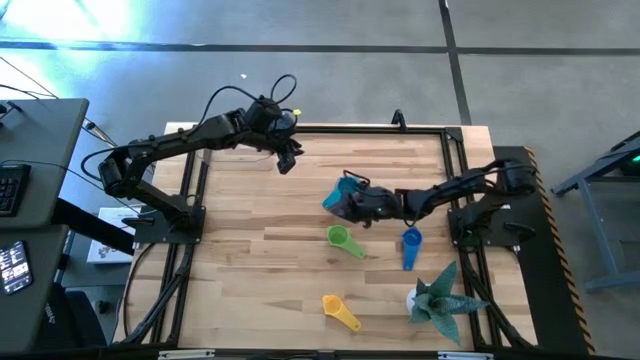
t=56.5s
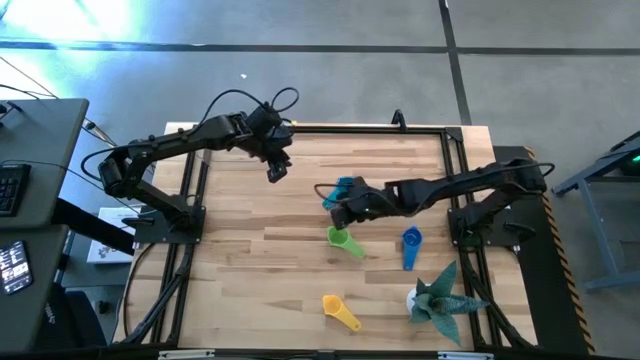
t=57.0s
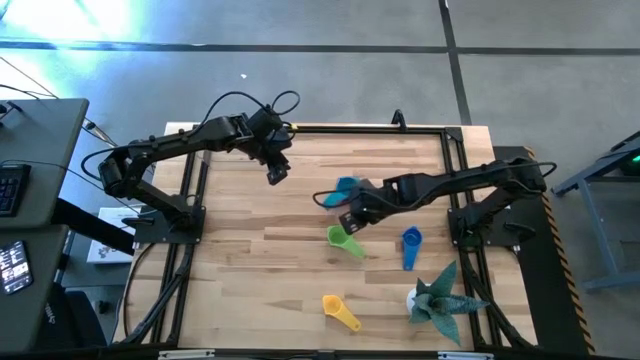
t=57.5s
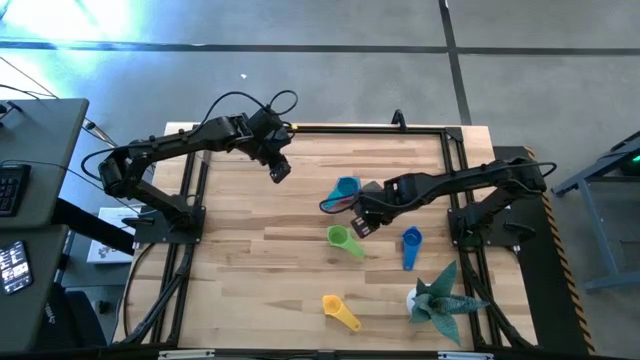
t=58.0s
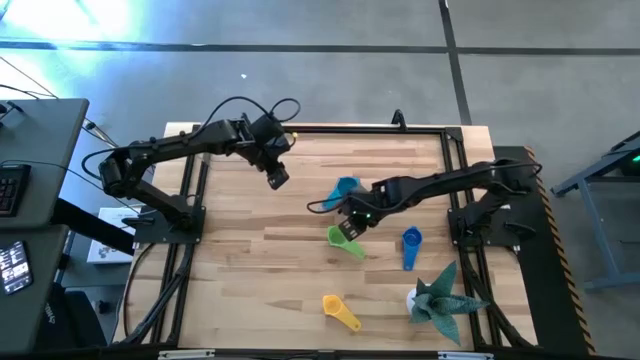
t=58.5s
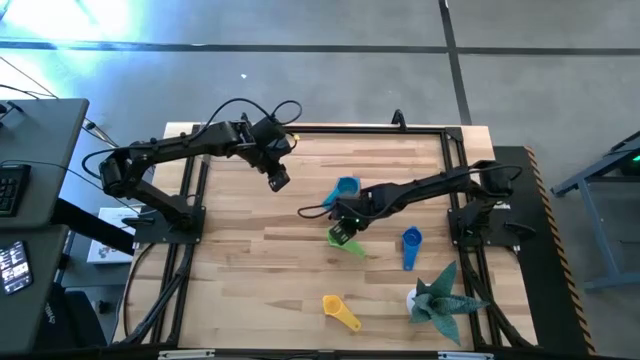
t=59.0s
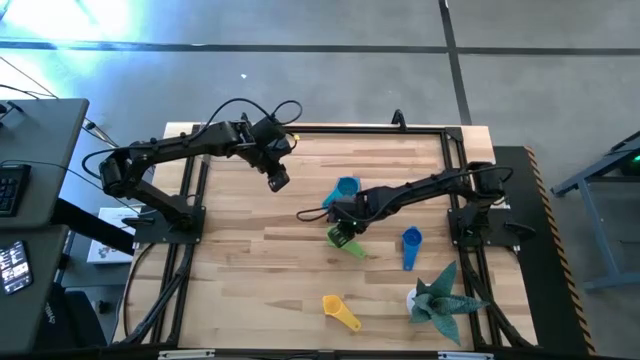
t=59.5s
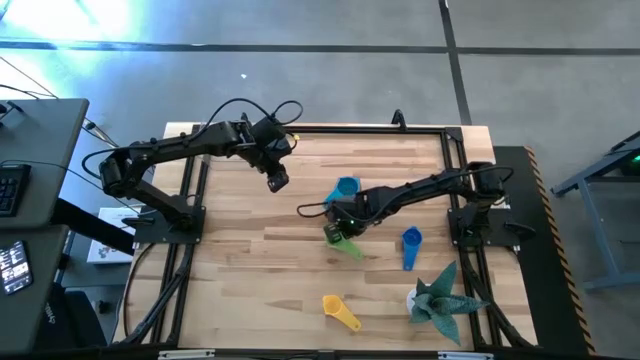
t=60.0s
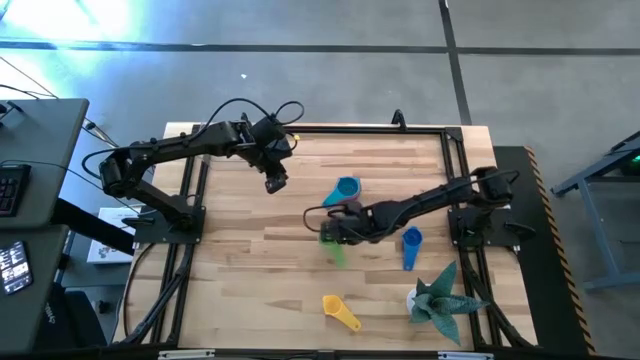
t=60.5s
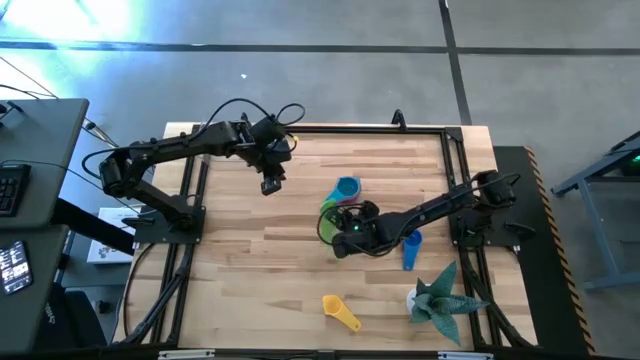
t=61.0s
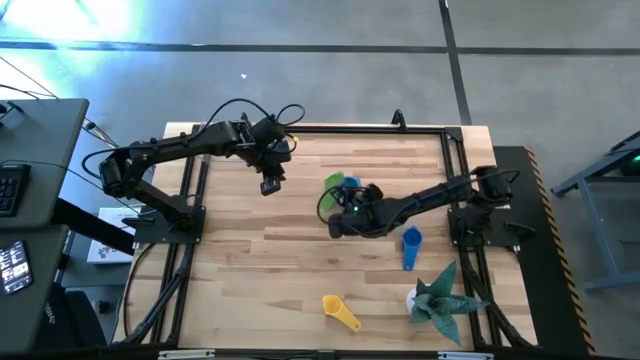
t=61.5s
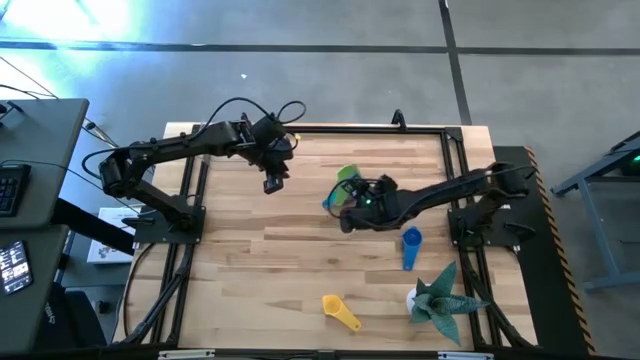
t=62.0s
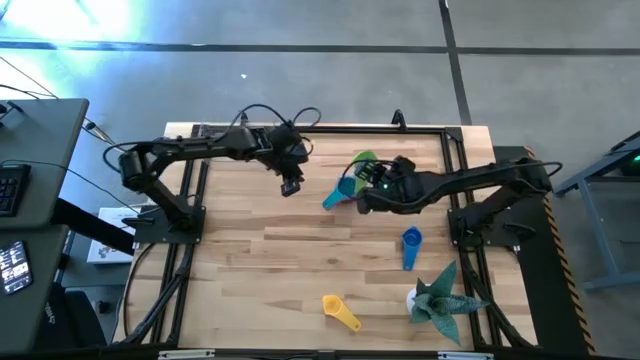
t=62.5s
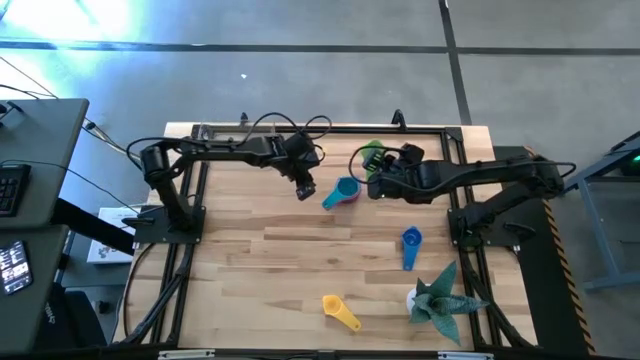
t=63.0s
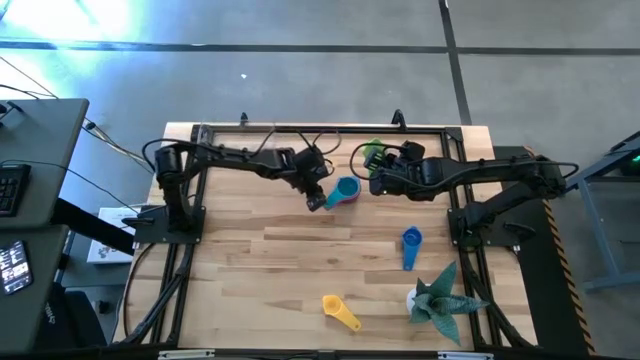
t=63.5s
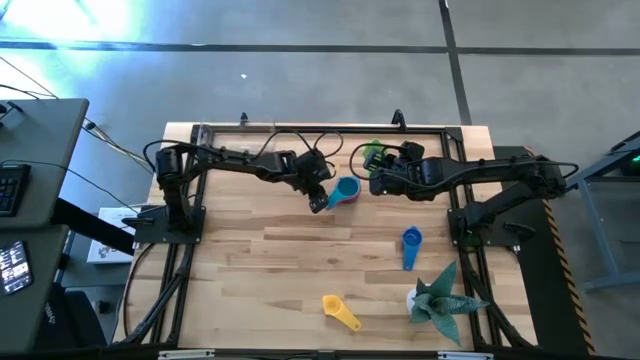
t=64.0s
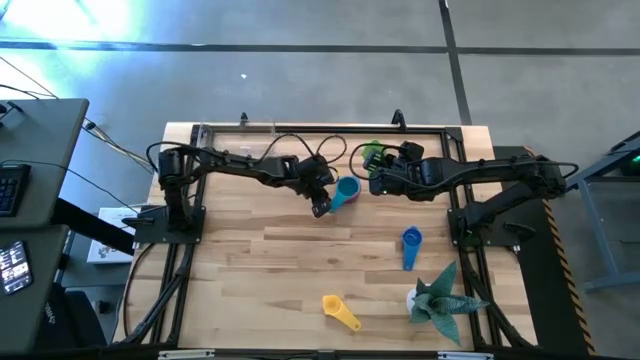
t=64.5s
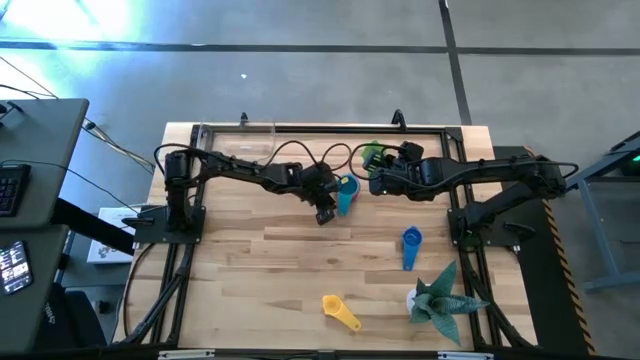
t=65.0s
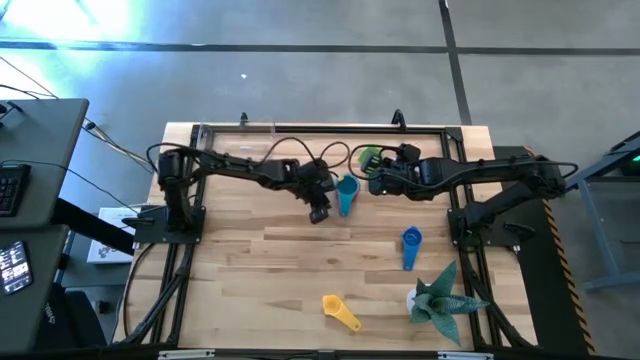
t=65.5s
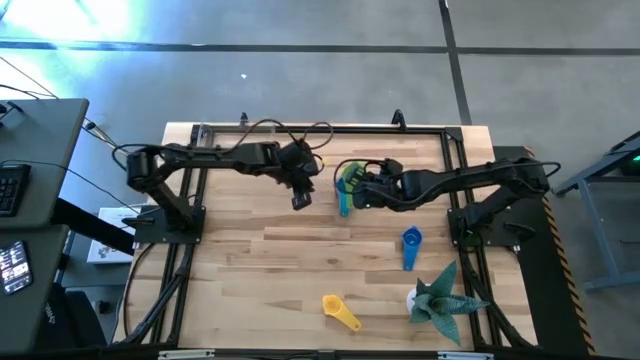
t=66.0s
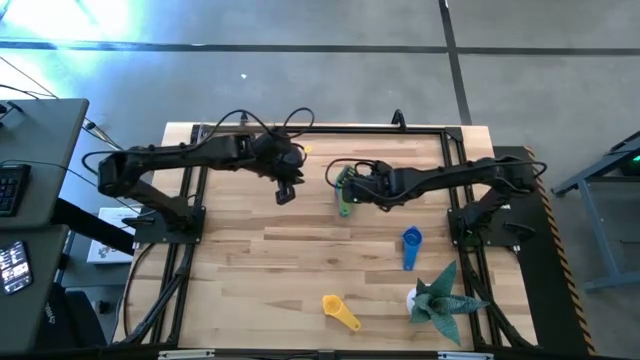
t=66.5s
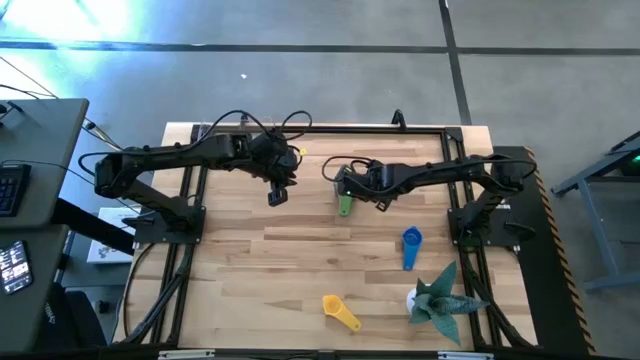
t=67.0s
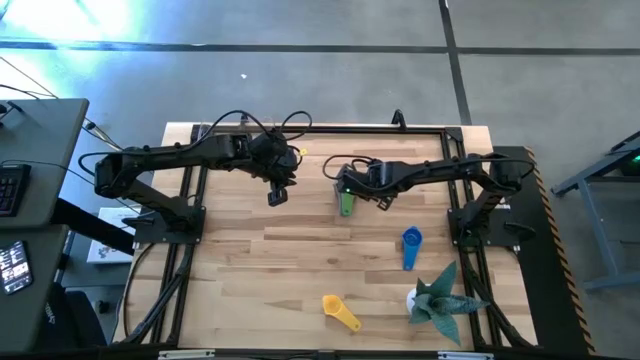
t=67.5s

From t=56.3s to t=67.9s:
Task: Nest measuring cups in basket
Stack the green measuring cup on top of the light blue measuring cup on the table

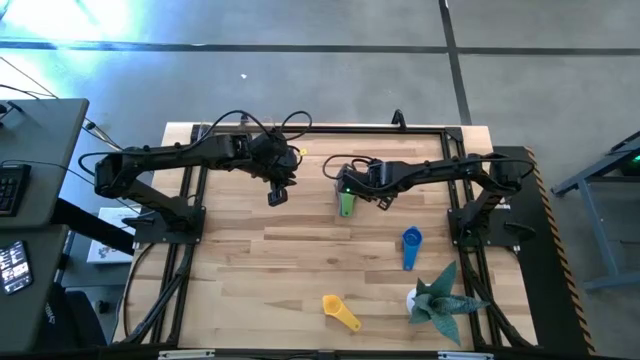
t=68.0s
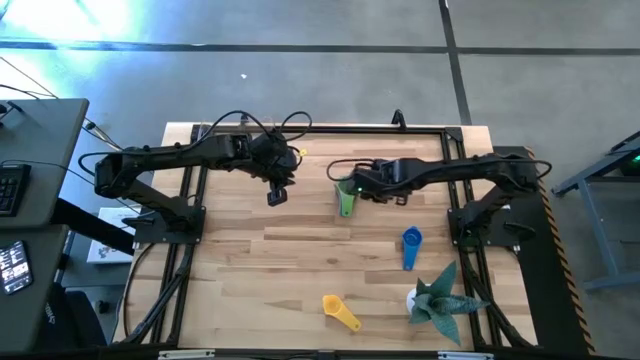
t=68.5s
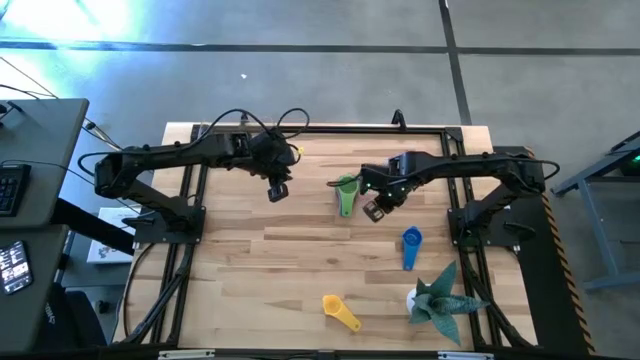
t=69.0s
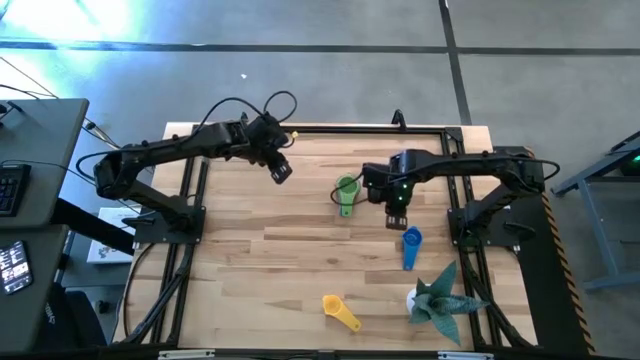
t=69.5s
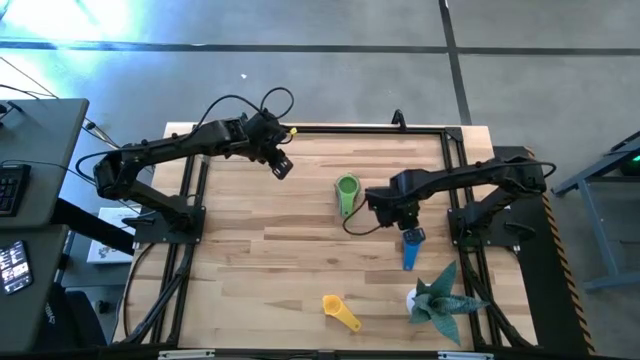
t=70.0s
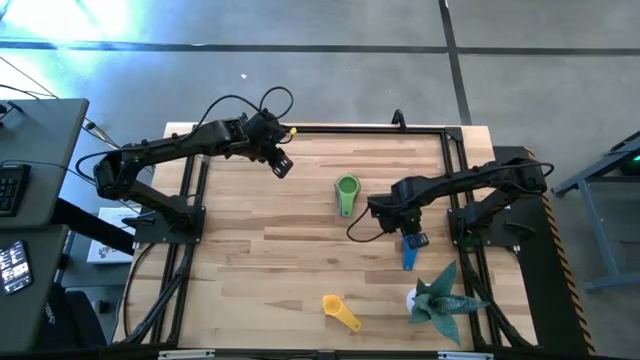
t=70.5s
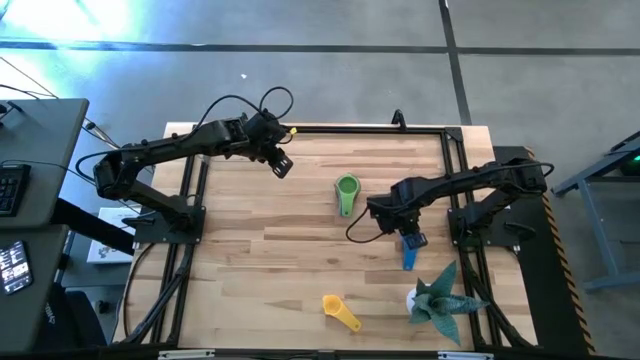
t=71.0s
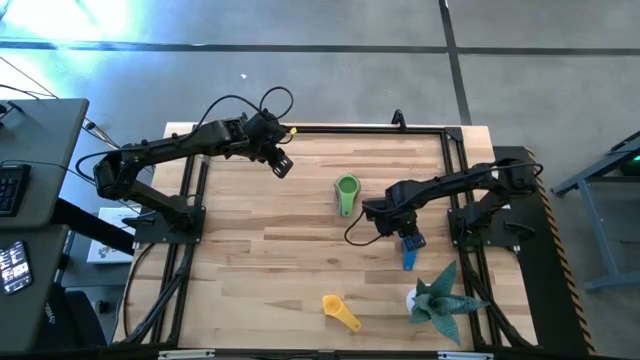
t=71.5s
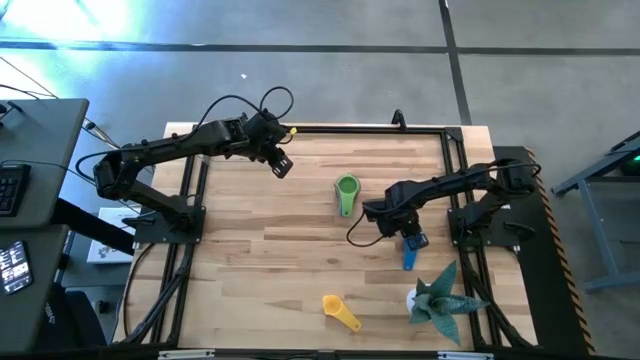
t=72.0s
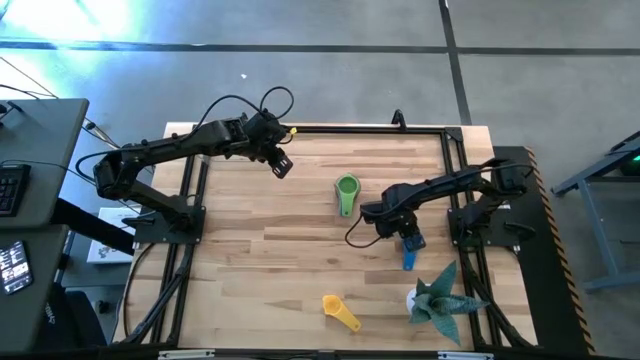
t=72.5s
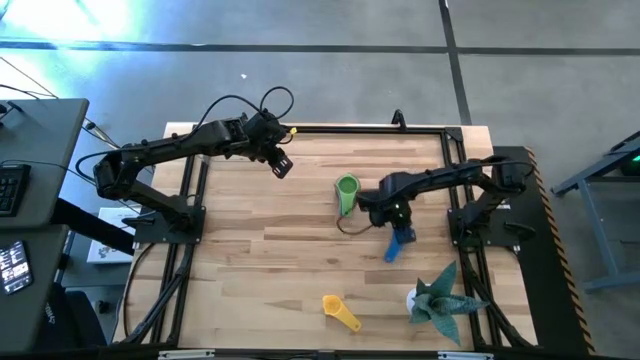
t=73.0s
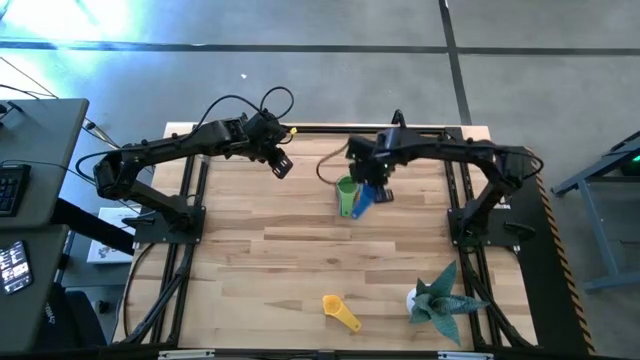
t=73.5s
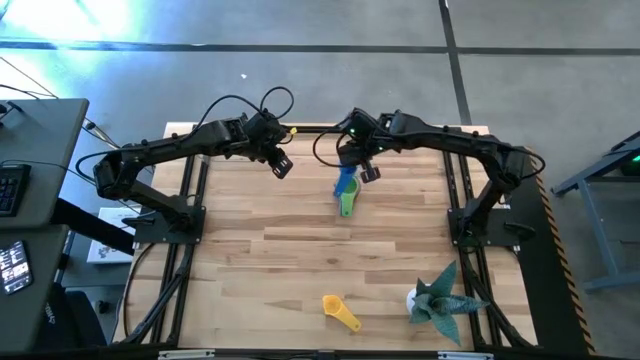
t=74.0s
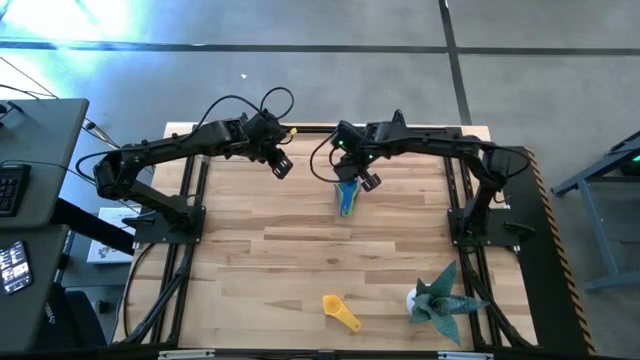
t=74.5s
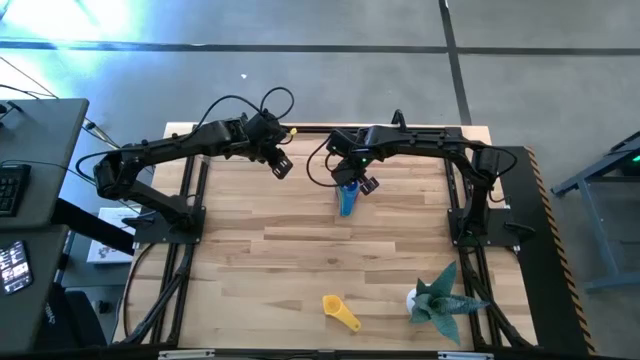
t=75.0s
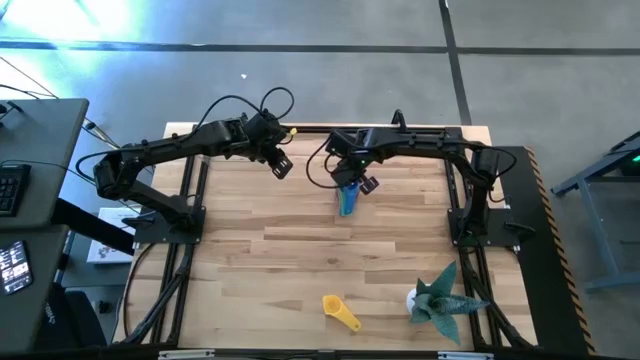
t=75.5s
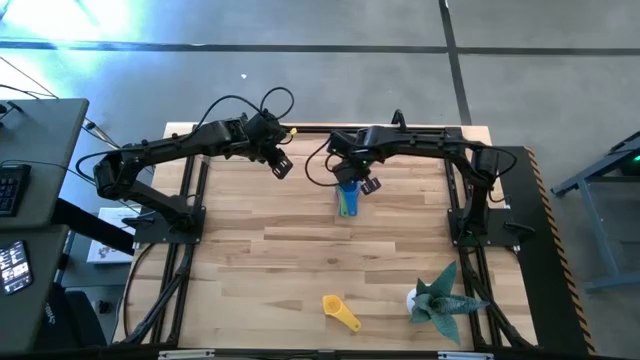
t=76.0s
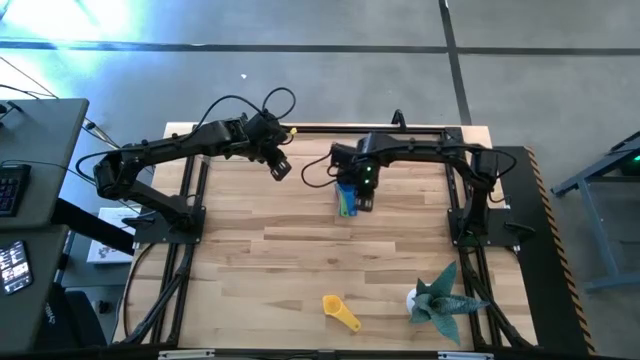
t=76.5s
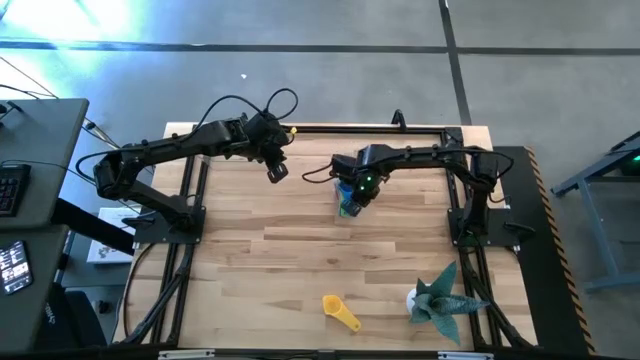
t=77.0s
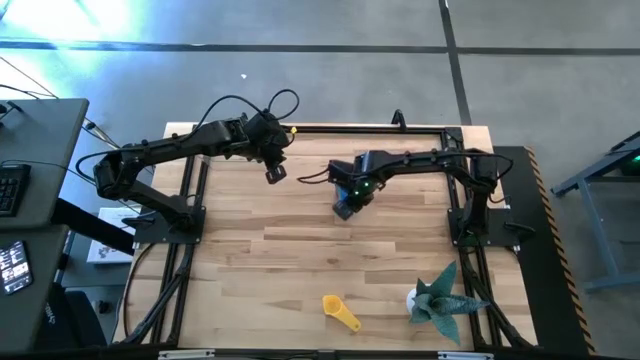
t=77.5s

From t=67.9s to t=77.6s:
Stack the blue measuring cup on top of the green measuring cup on the table
